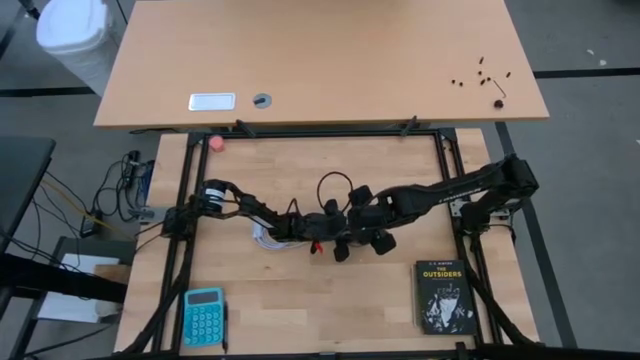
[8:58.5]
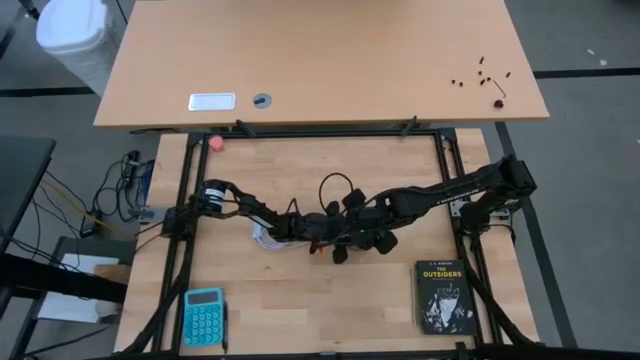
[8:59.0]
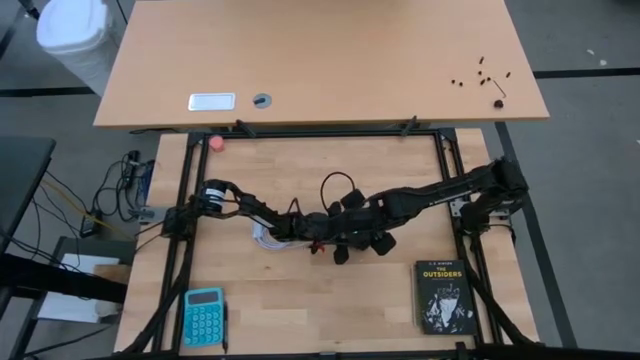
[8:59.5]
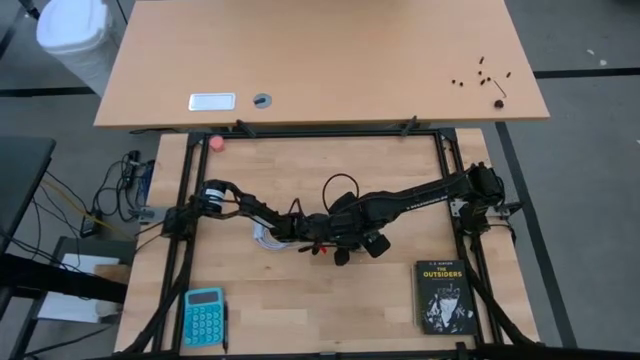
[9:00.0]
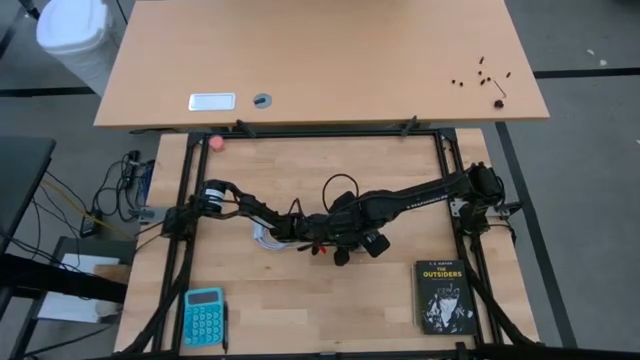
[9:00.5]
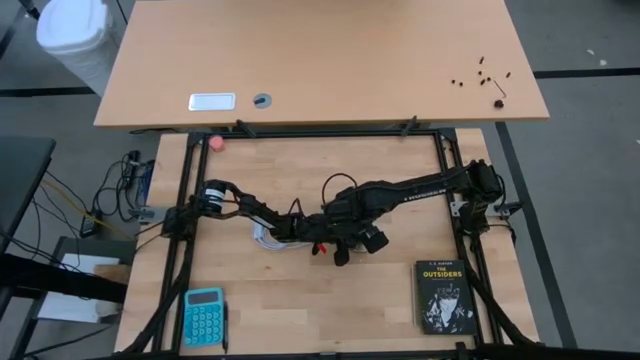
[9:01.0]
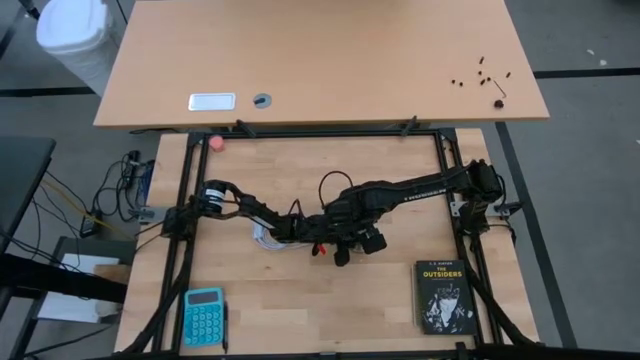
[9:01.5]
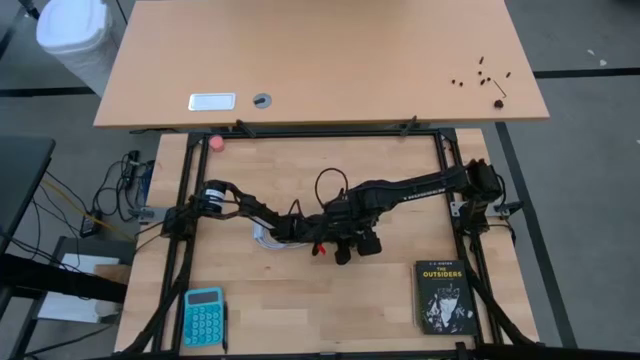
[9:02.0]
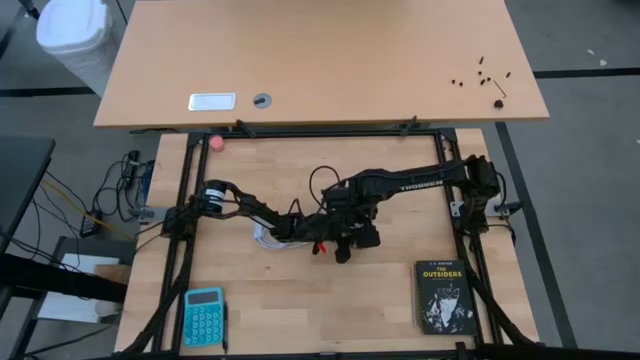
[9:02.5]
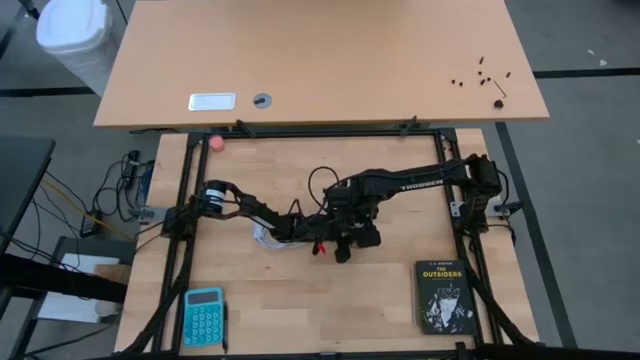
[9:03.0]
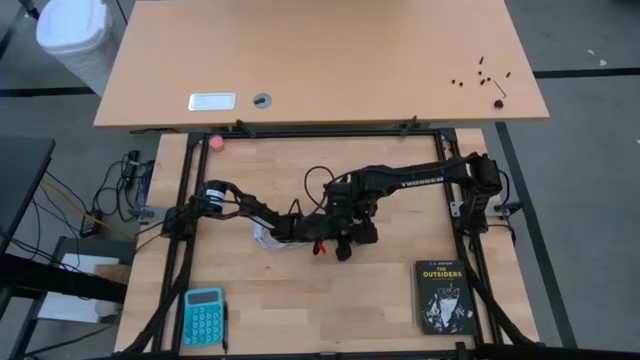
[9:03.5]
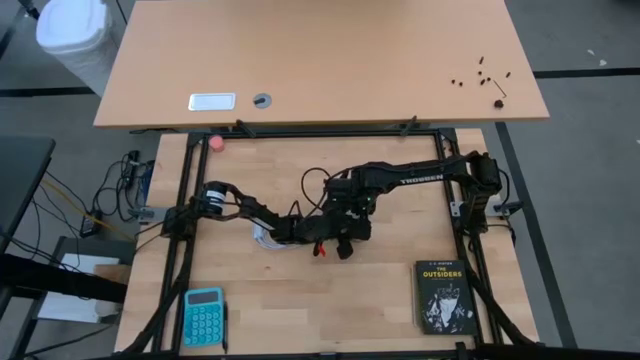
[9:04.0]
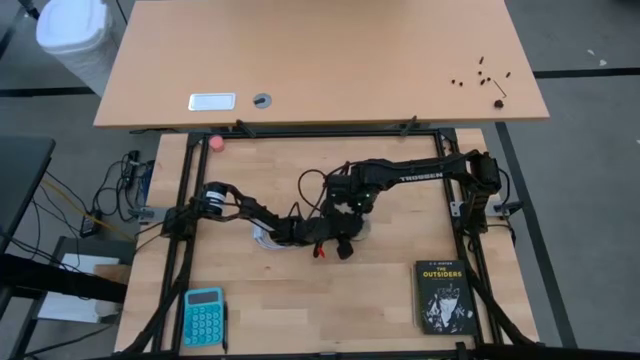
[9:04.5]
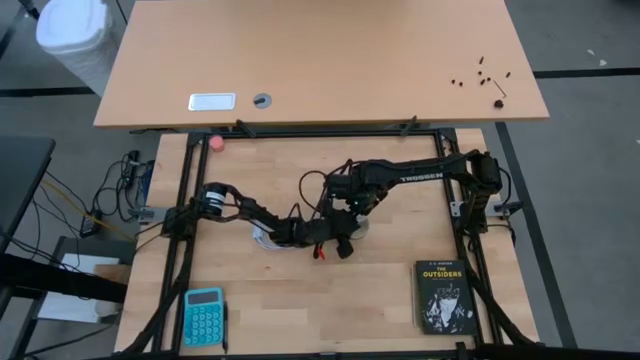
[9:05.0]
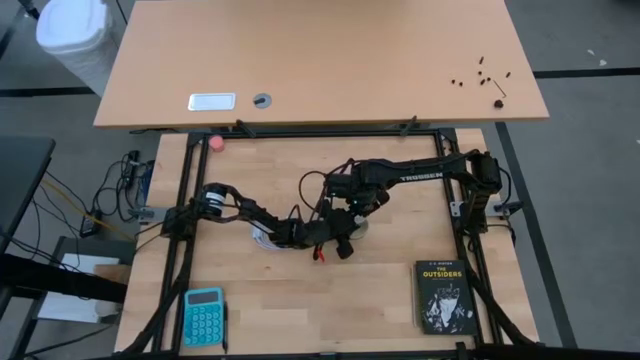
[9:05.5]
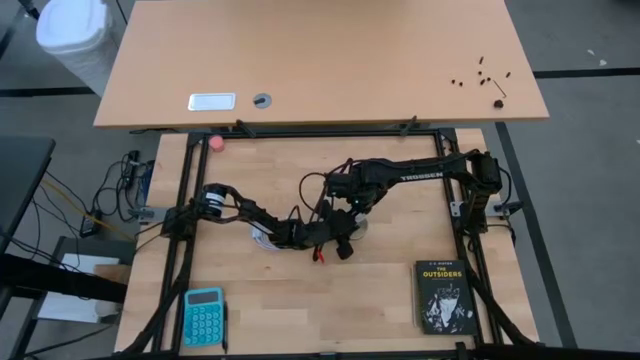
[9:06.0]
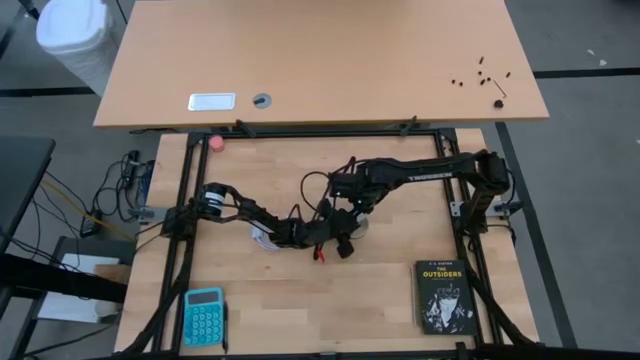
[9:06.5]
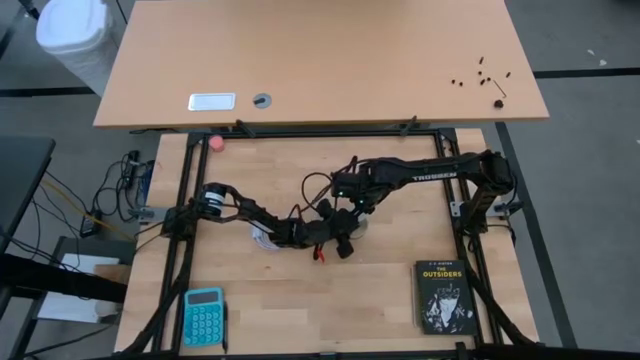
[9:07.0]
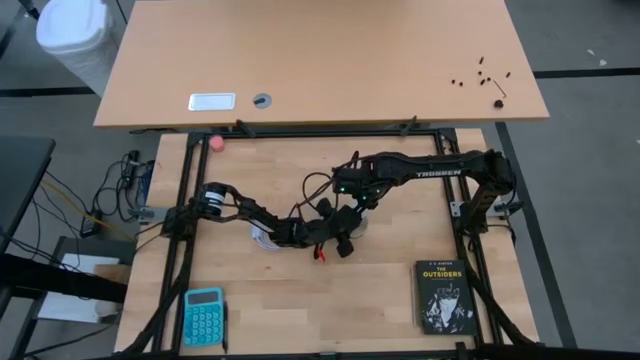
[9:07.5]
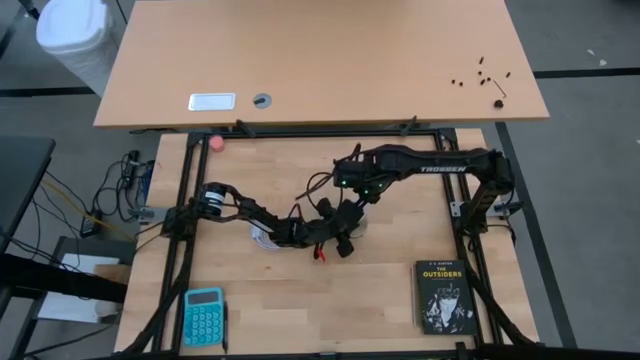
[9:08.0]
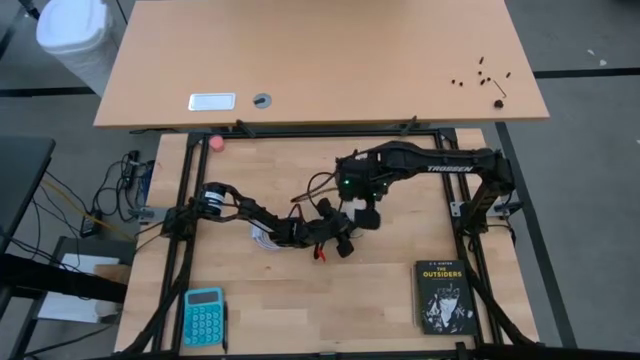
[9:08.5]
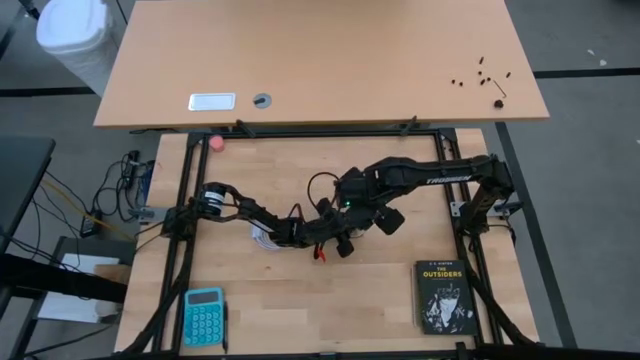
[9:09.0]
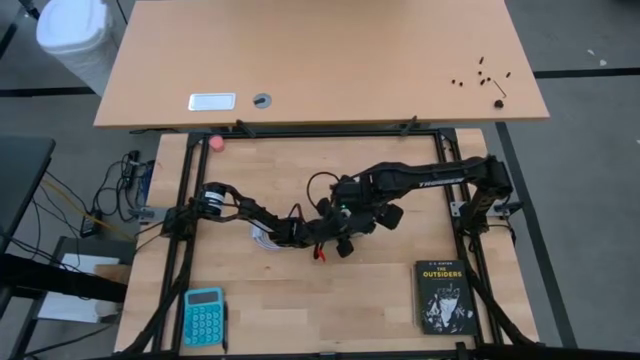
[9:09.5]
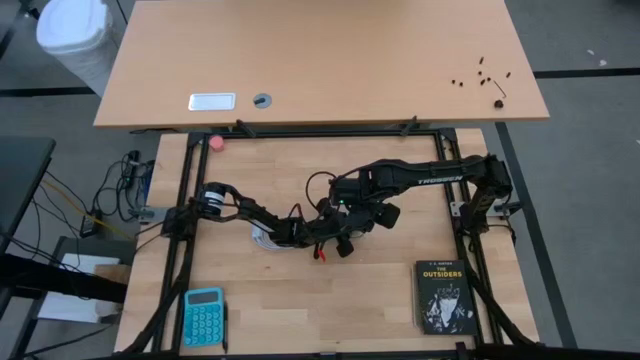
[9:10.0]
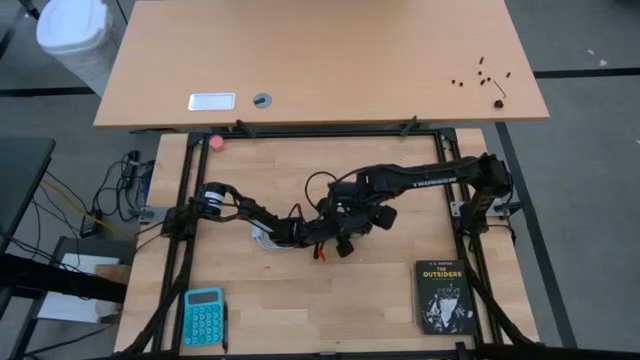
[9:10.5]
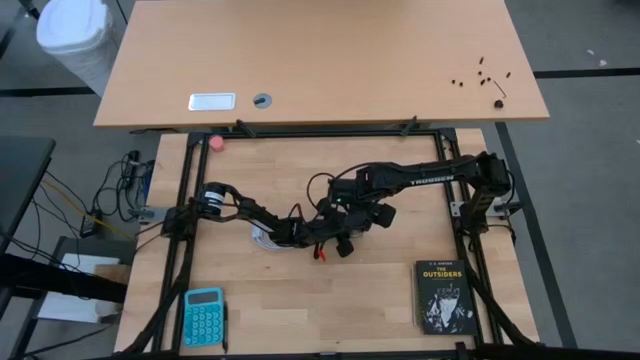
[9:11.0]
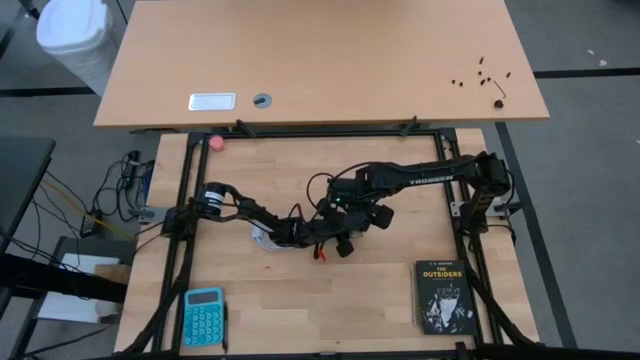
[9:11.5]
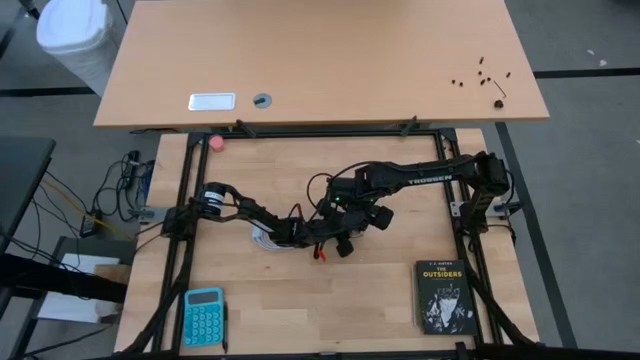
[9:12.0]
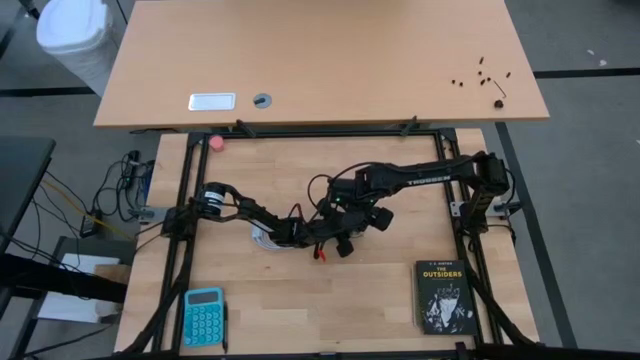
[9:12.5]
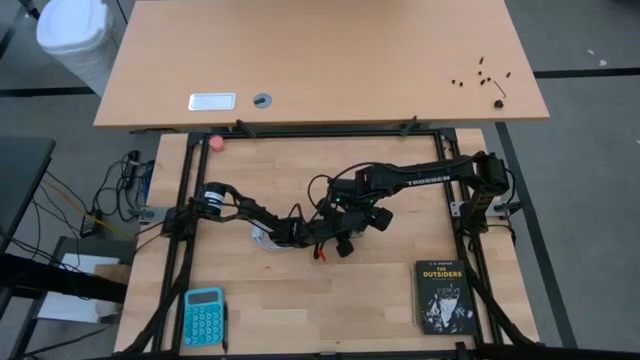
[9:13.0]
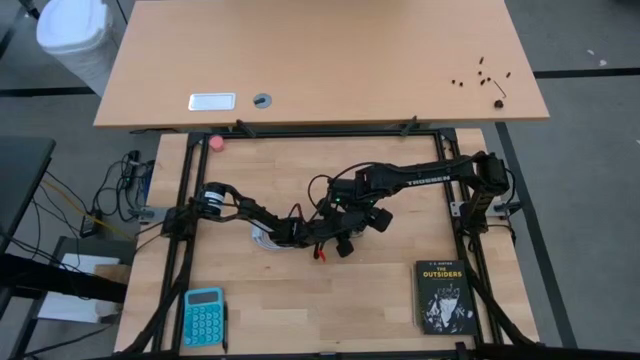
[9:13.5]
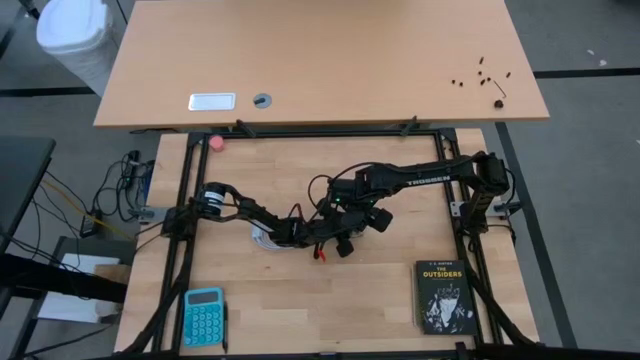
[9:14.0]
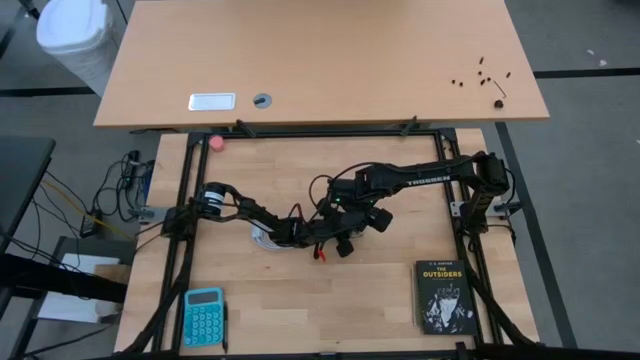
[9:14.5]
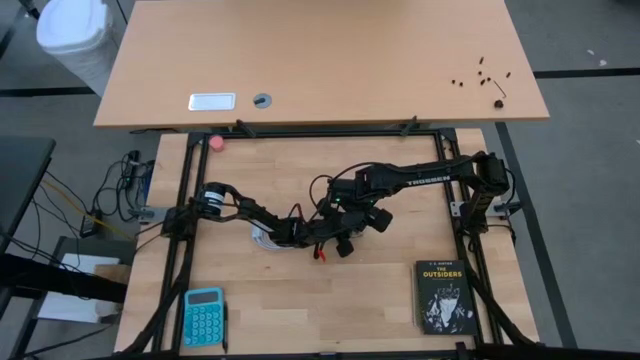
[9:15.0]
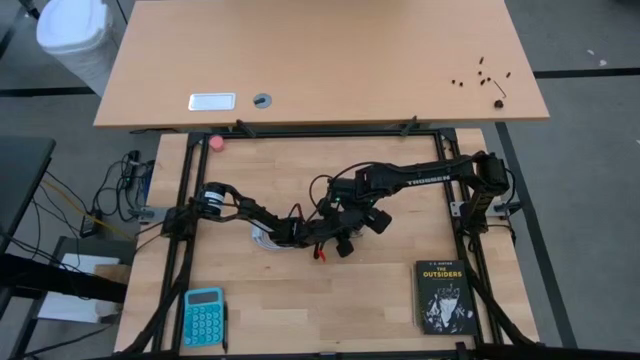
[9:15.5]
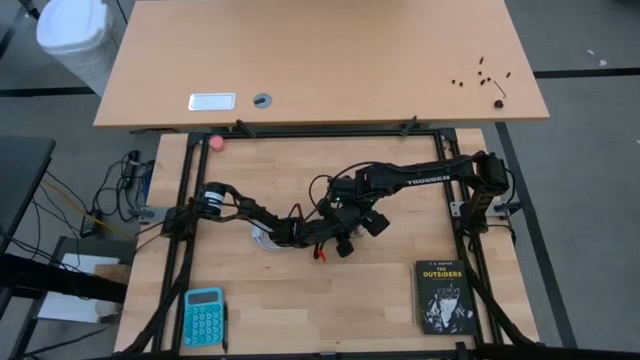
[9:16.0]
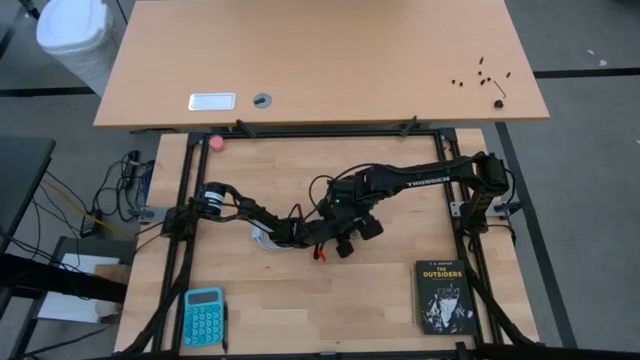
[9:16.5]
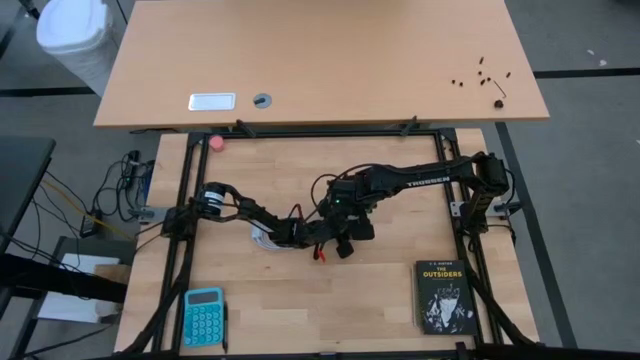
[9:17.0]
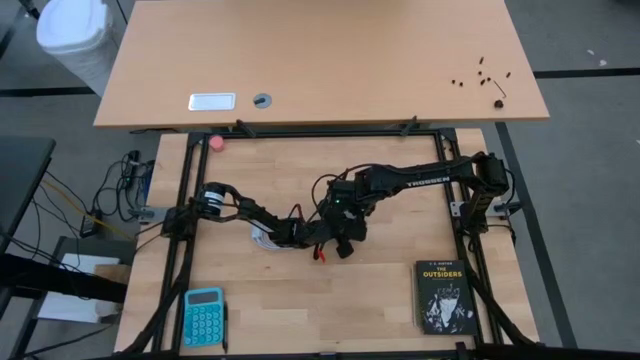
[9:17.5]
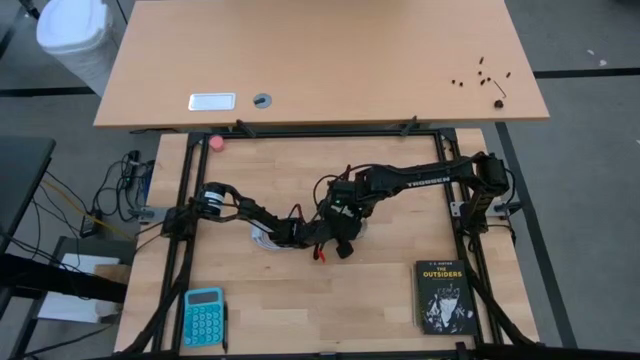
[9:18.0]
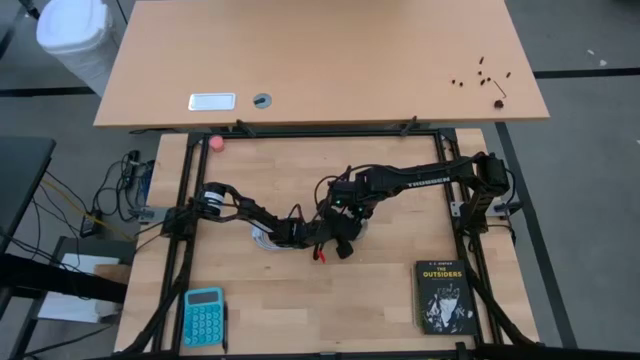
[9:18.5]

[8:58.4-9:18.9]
Task: Screw lightbulb
Insert the white lightbulb into the silver lamp
